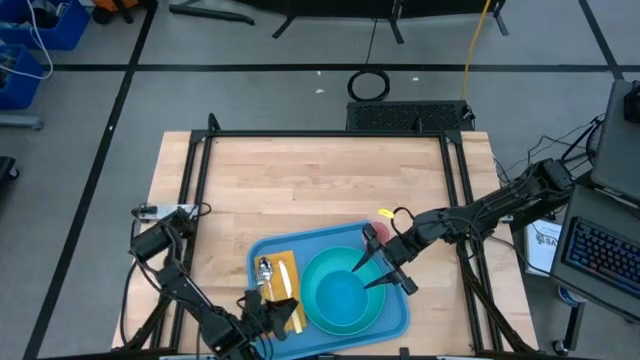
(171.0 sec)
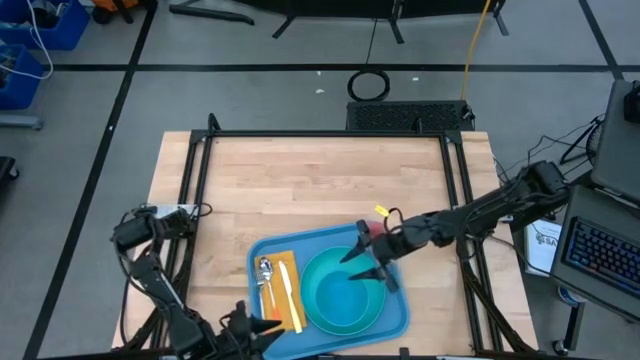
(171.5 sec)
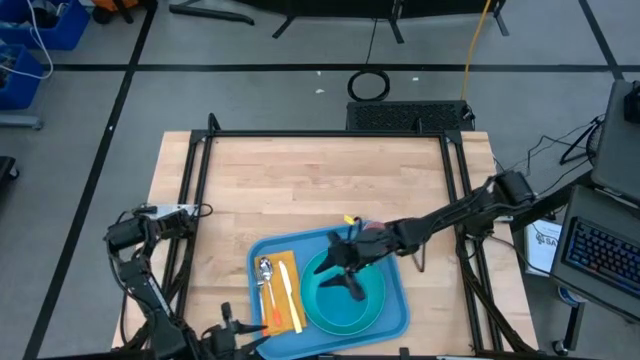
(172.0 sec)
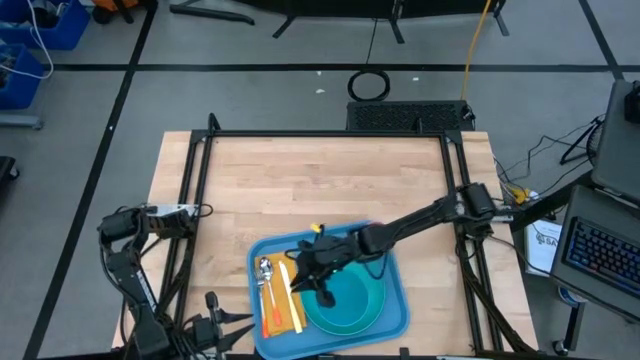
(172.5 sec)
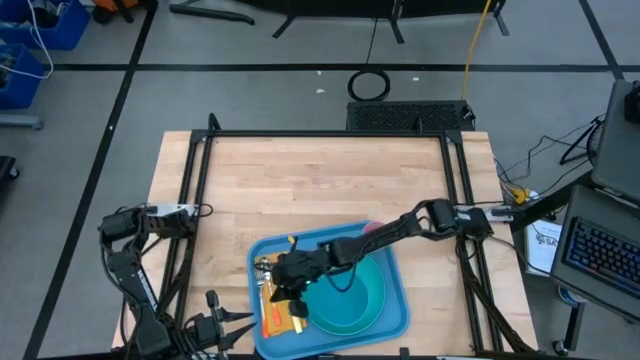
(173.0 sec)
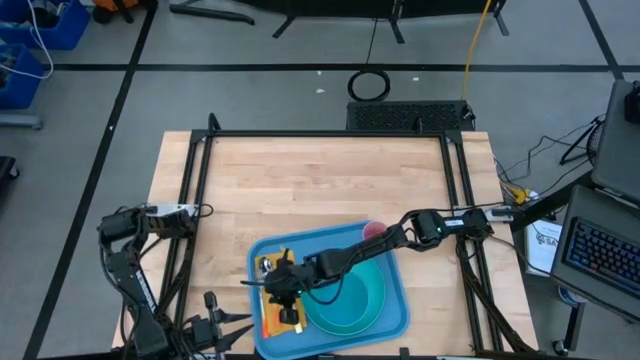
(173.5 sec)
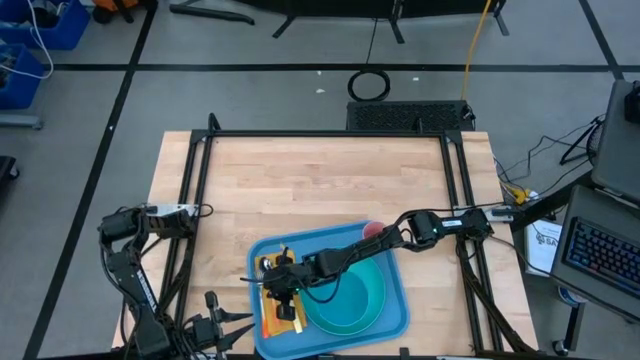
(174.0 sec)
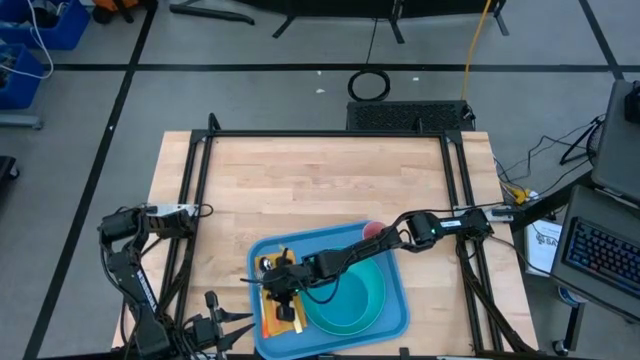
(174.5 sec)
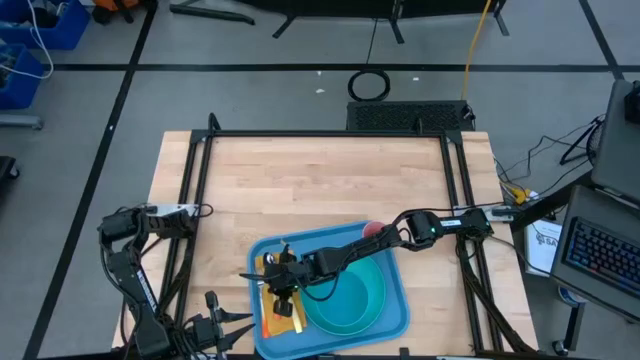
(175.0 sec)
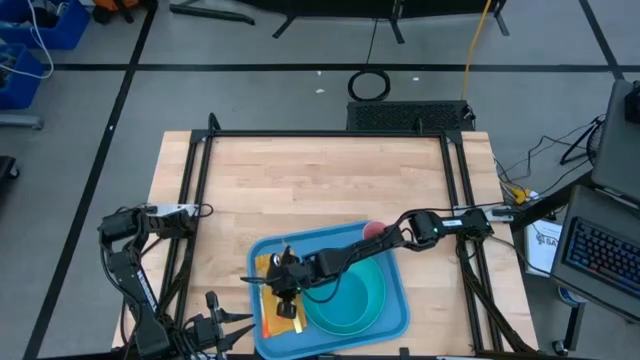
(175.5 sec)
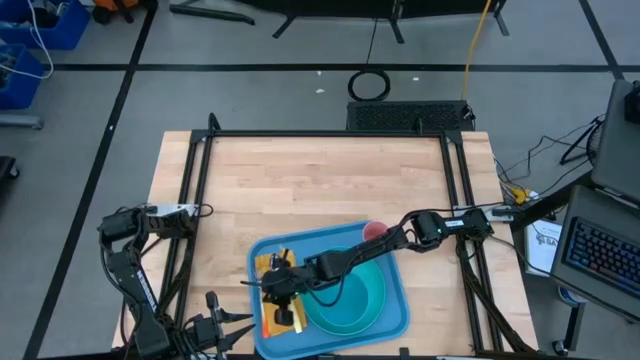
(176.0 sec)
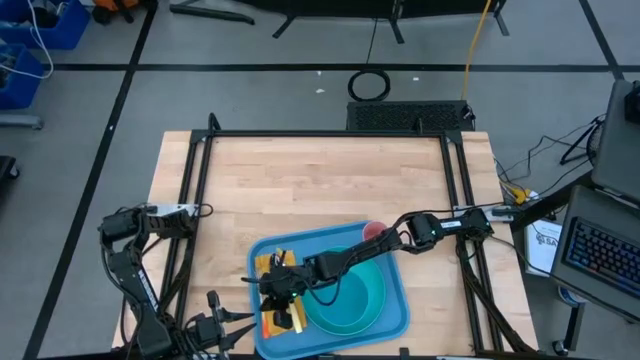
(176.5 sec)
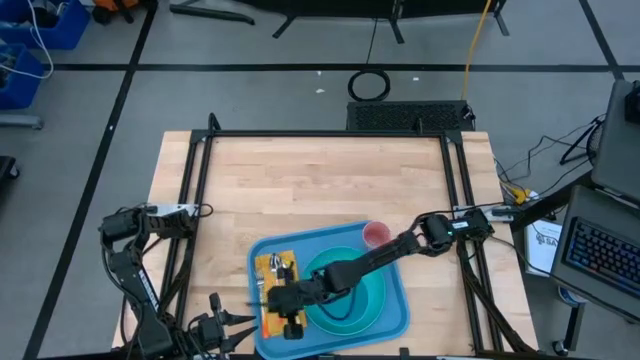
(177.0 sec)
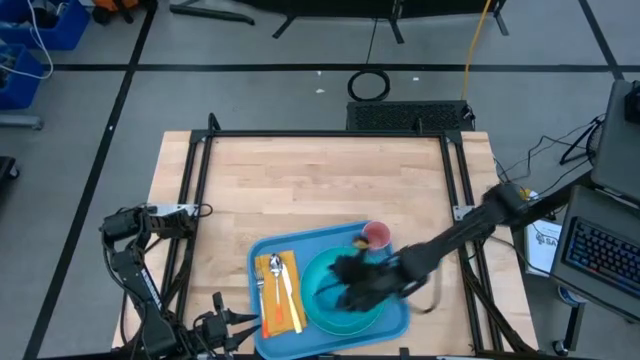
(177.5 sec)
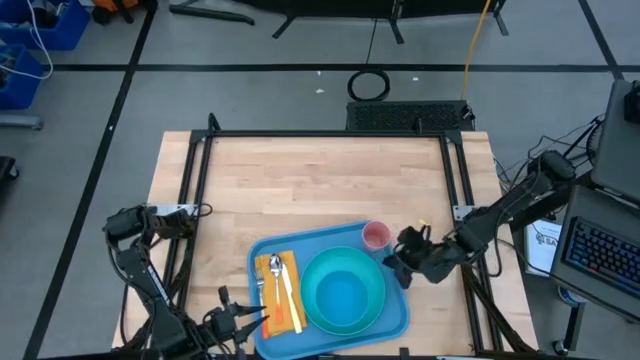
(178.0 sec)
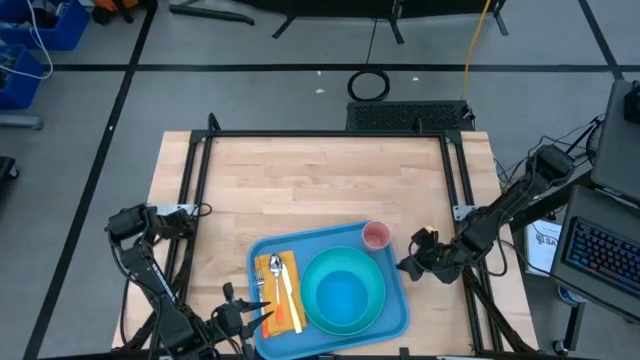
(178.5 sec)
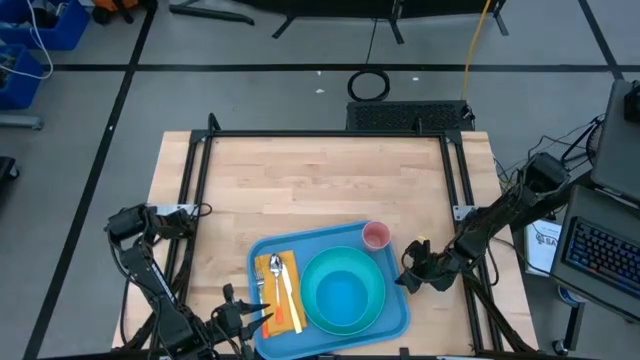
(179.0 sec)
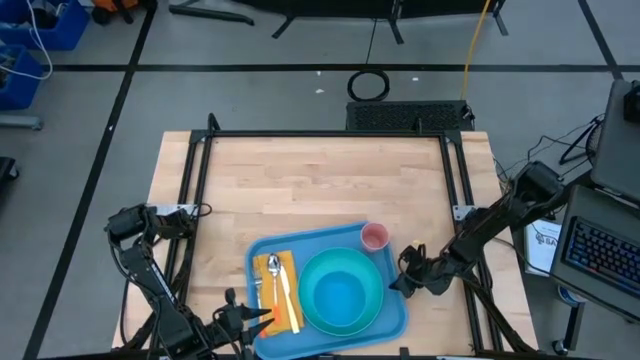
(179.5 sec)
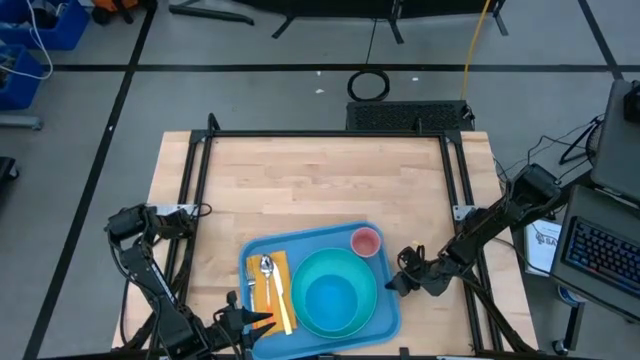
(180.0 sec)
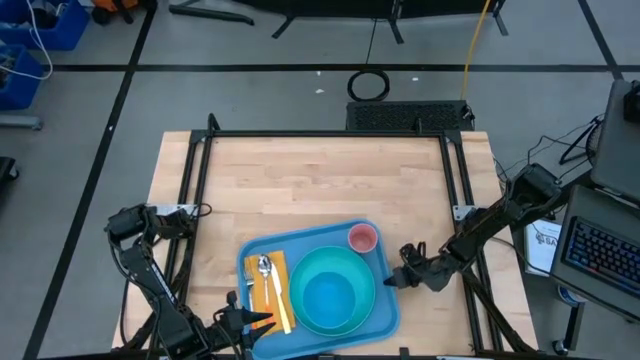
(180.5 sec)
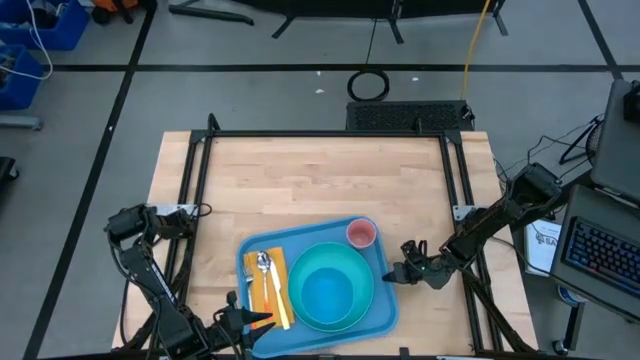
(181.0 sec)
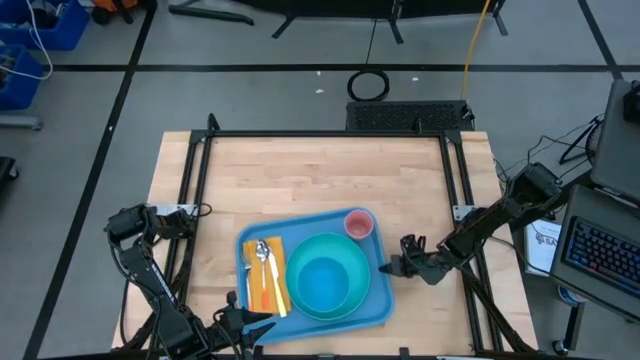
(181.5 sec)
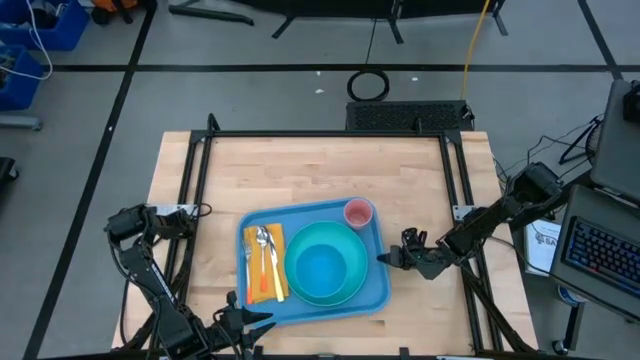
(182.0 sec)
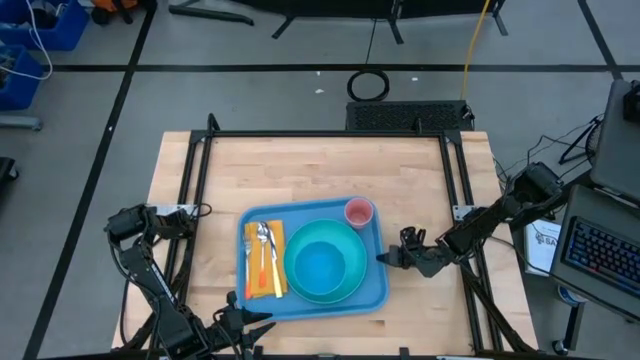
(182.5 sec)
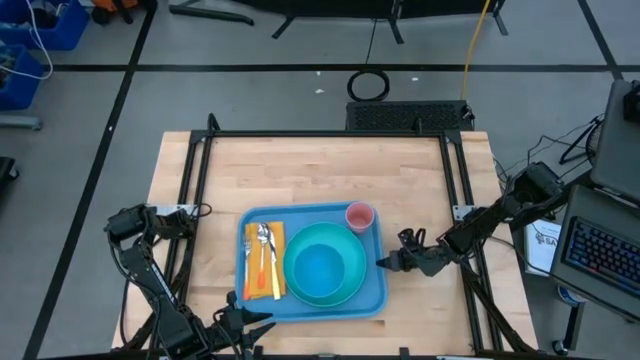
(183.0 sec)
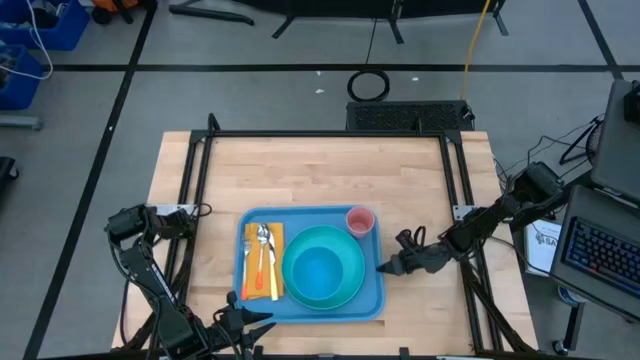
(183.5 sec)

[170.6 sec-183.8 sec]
Task: Set up tray
Move the serving tray to the center of the table

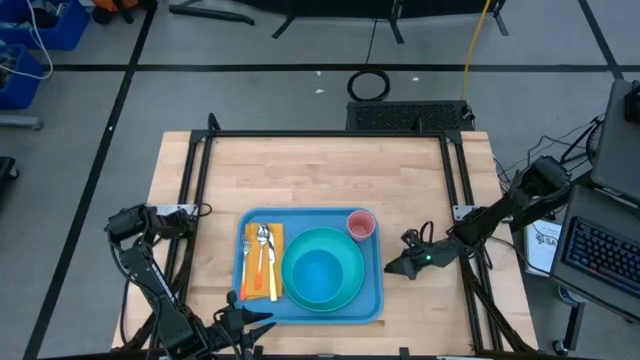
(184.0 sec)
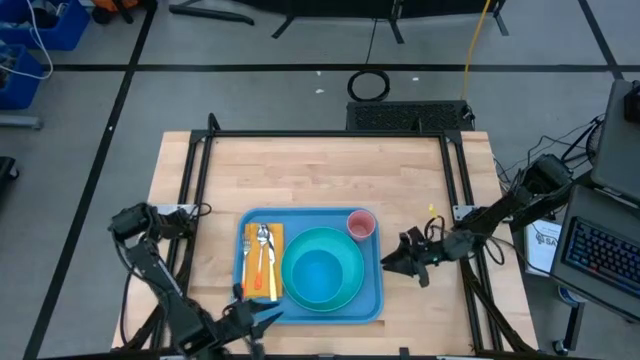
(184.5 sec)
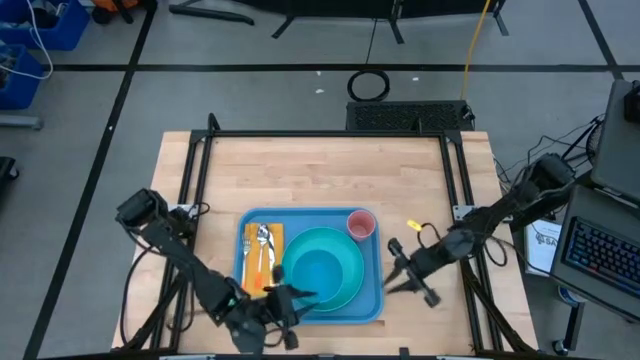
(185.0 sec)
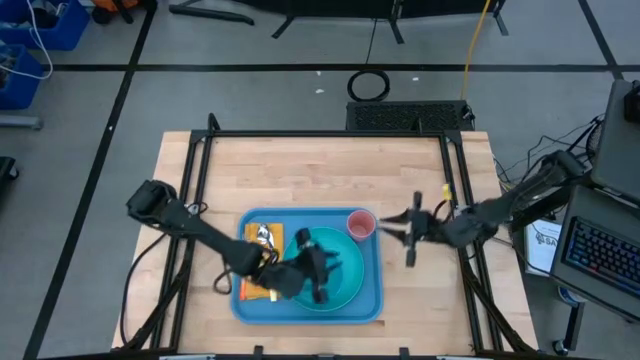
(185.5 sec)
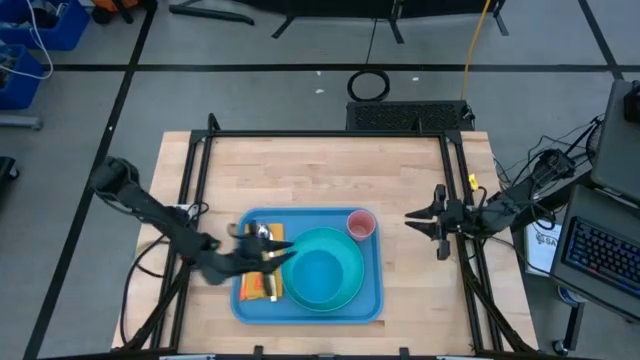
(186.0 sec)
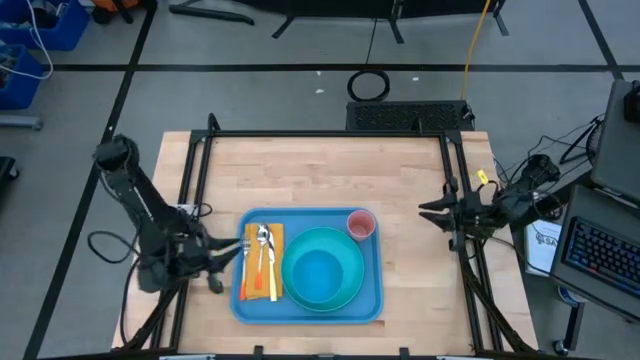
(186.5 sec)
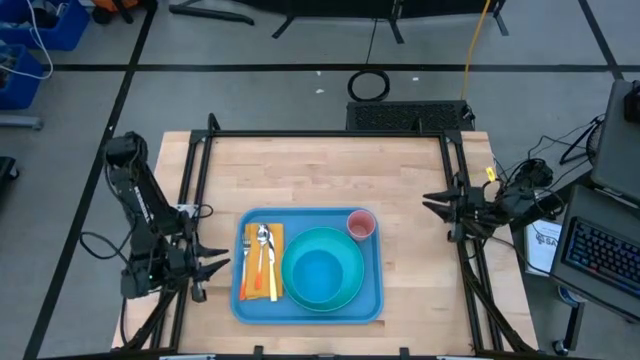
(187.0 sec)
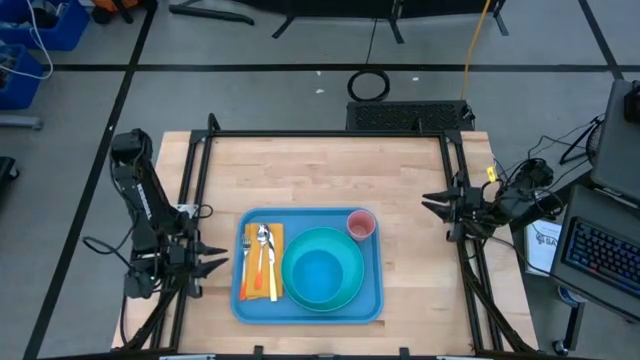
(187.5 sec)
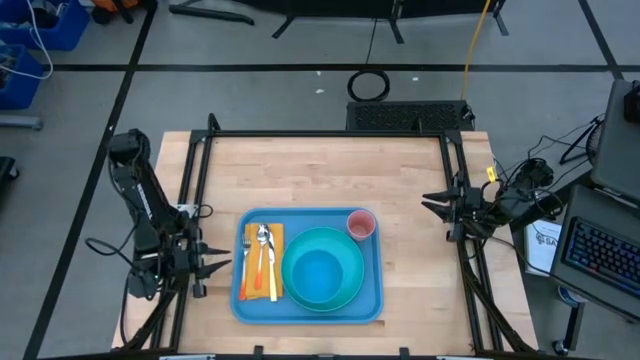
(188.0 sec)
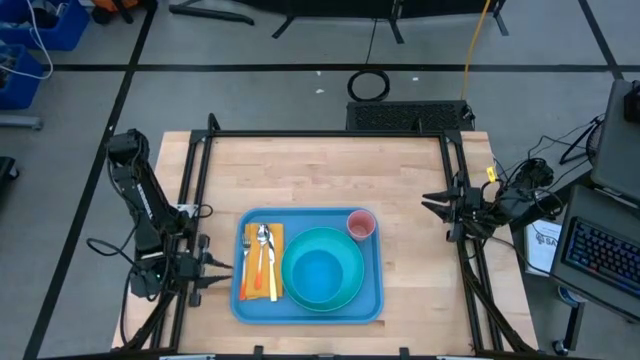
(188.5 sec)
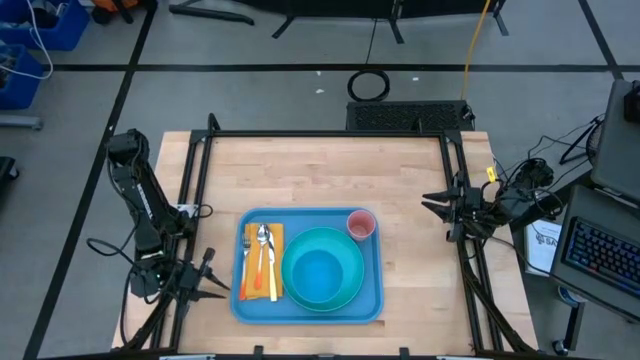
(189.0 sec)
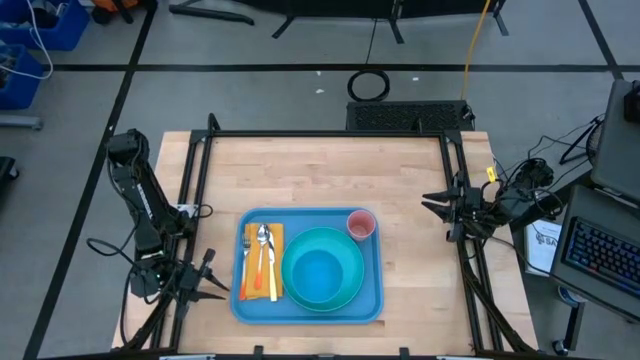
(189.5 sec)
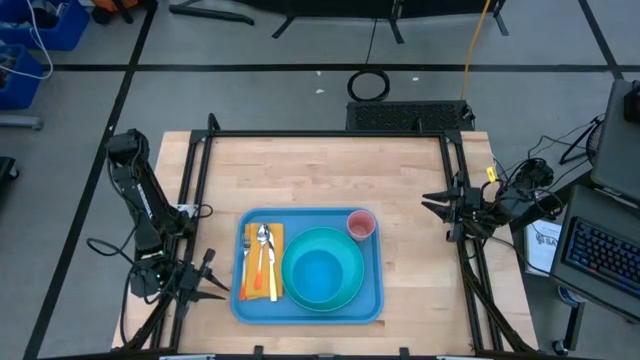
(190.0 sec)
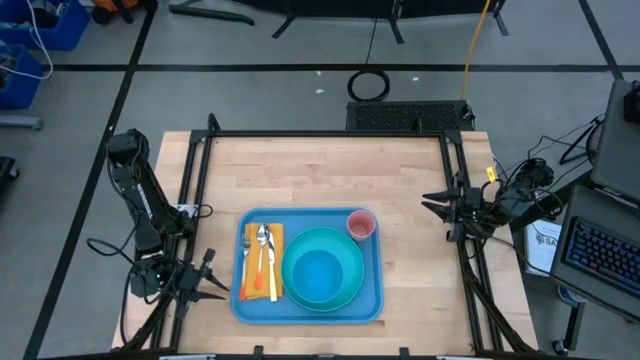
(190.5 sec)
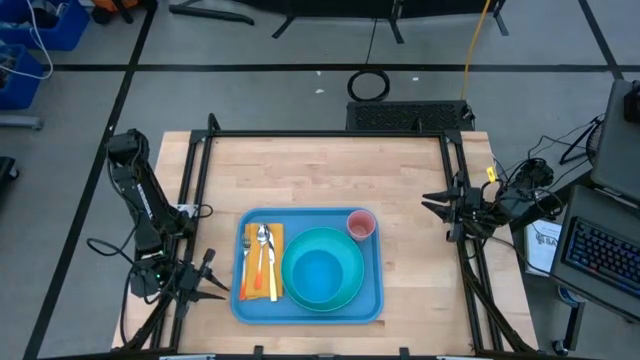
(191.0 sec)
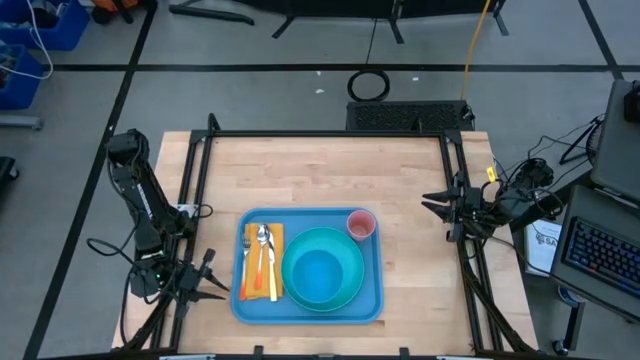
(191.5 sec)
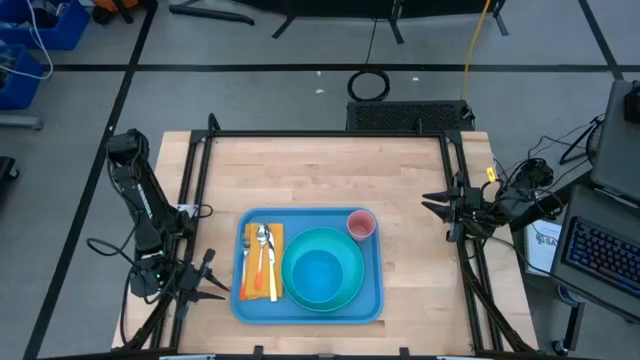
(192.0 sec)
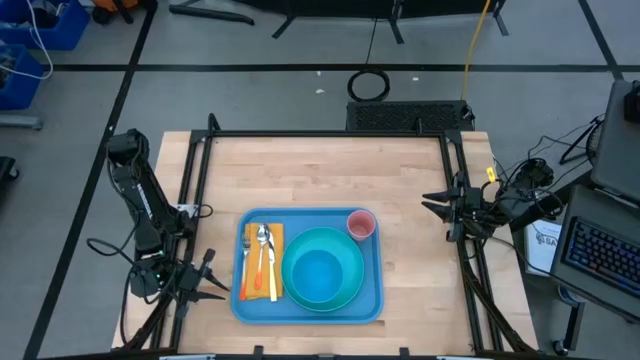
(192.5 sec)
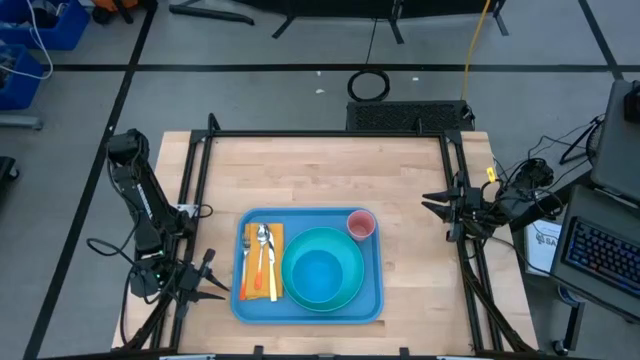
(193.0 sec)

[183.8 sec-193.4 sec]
Return to Home Position
